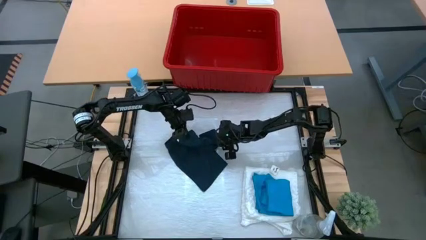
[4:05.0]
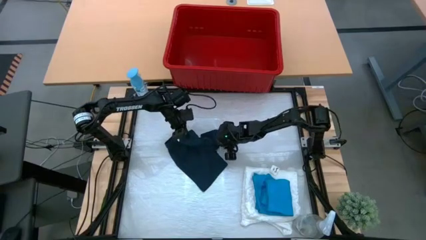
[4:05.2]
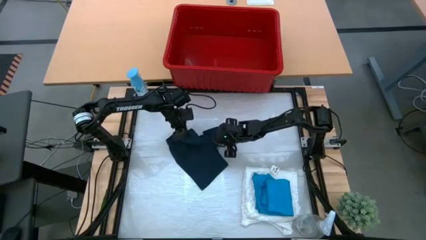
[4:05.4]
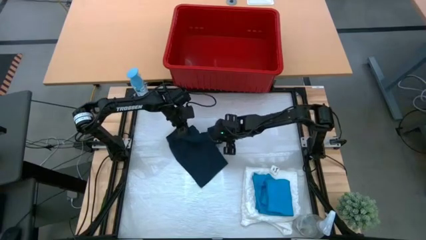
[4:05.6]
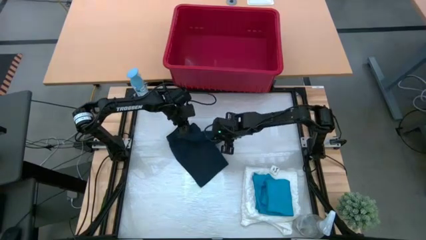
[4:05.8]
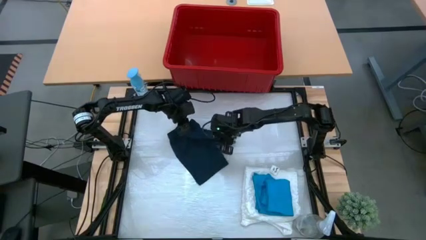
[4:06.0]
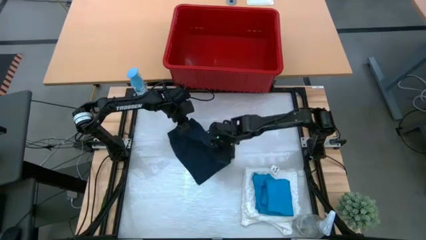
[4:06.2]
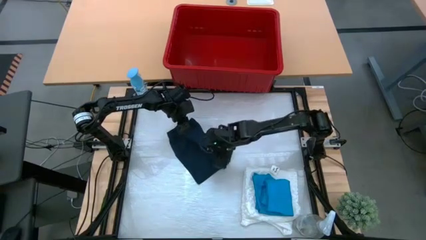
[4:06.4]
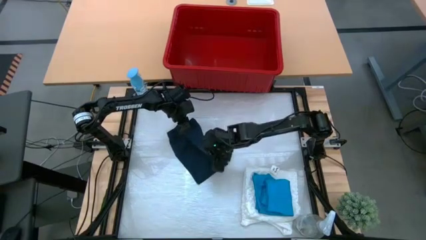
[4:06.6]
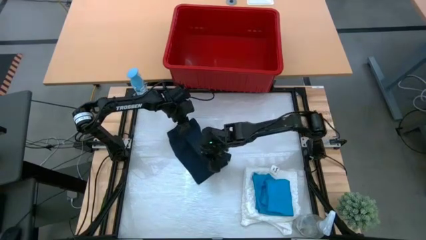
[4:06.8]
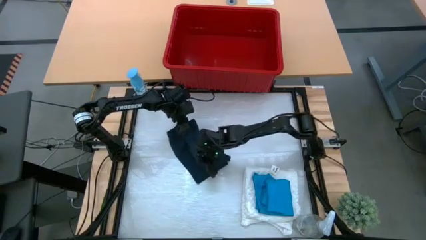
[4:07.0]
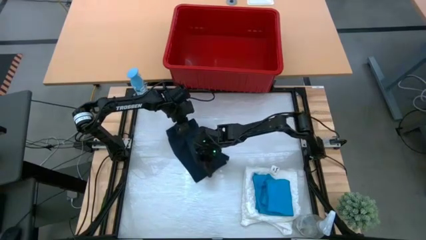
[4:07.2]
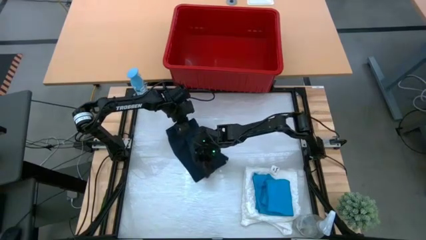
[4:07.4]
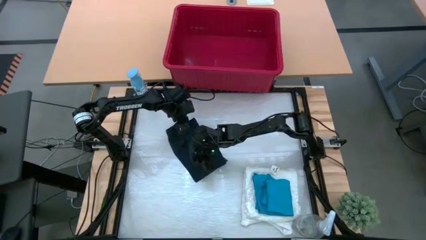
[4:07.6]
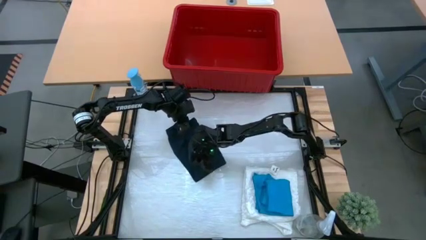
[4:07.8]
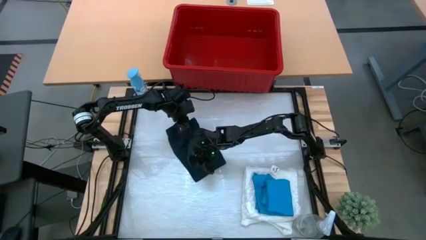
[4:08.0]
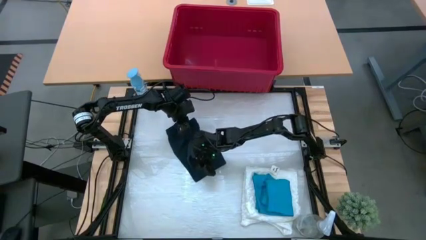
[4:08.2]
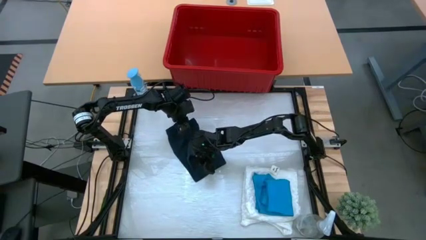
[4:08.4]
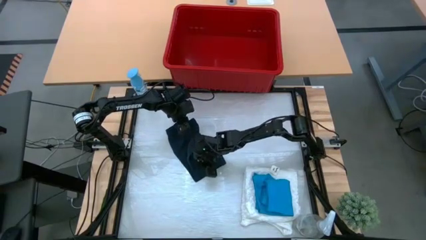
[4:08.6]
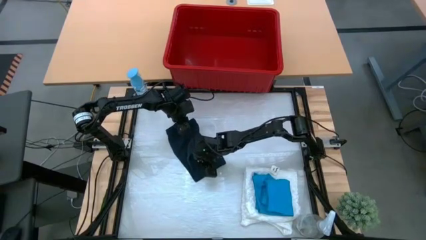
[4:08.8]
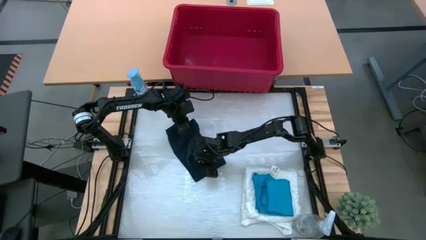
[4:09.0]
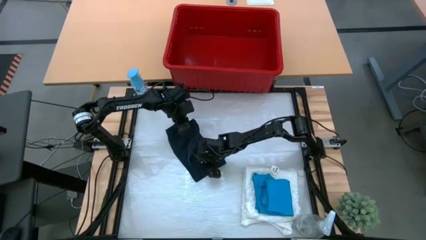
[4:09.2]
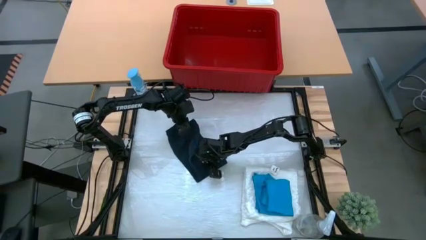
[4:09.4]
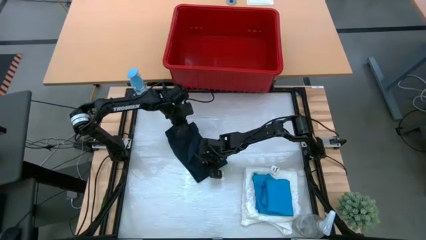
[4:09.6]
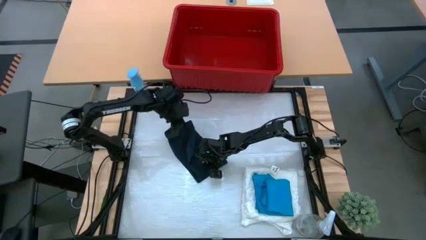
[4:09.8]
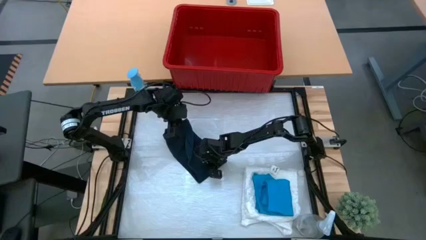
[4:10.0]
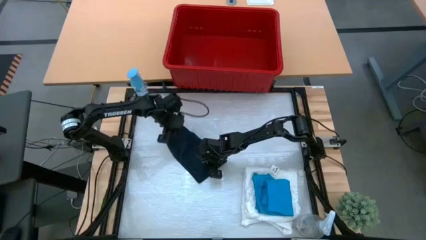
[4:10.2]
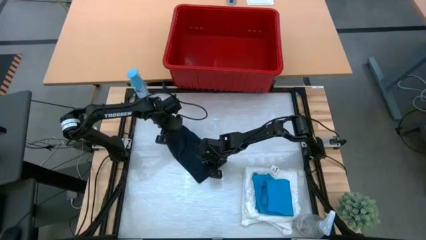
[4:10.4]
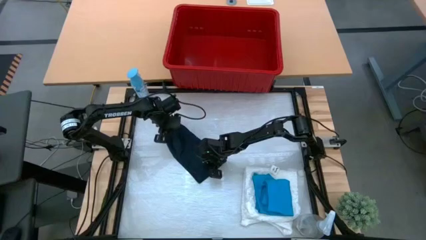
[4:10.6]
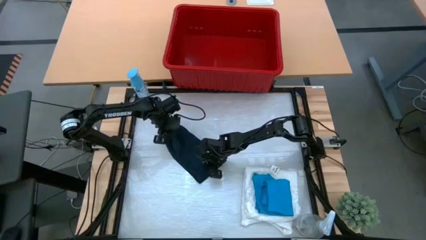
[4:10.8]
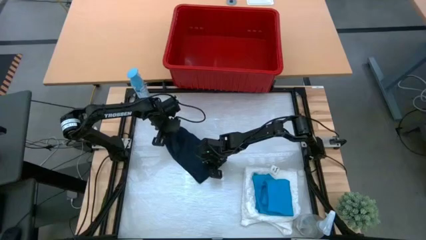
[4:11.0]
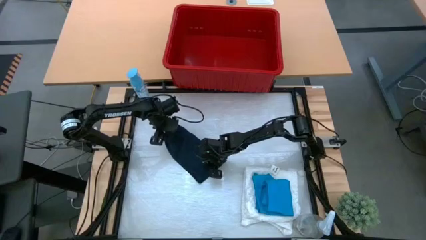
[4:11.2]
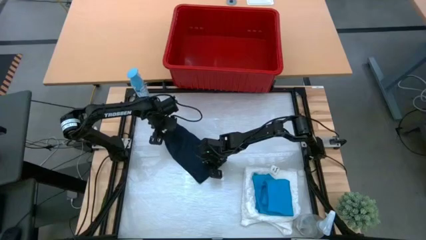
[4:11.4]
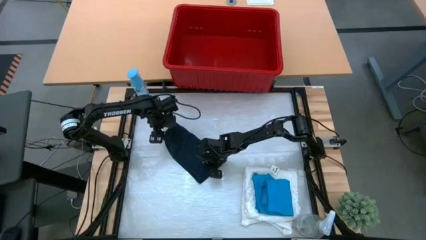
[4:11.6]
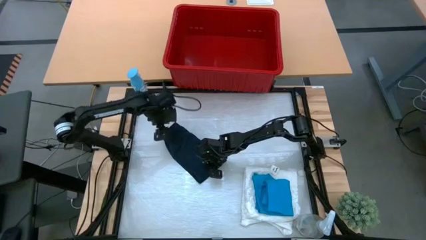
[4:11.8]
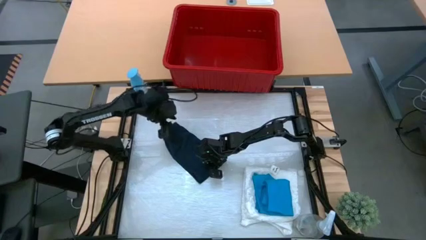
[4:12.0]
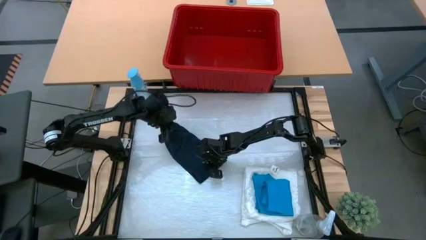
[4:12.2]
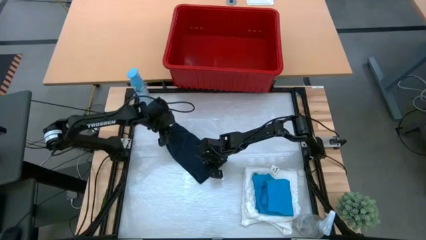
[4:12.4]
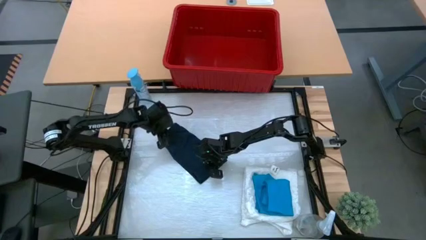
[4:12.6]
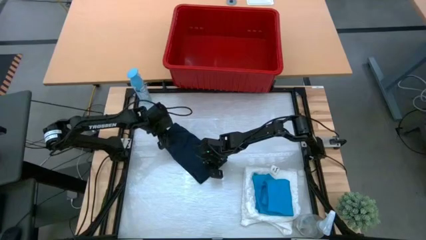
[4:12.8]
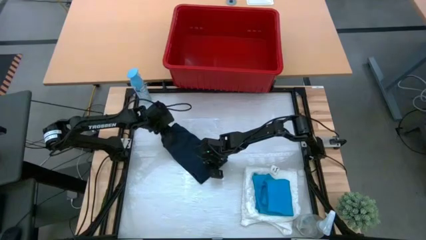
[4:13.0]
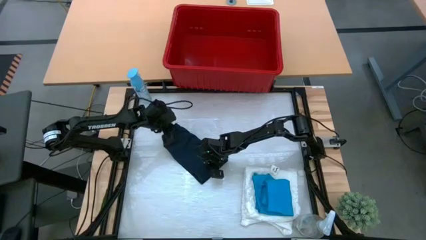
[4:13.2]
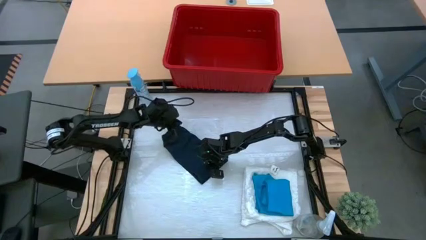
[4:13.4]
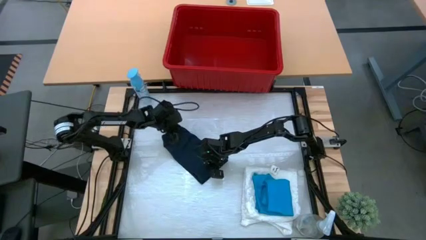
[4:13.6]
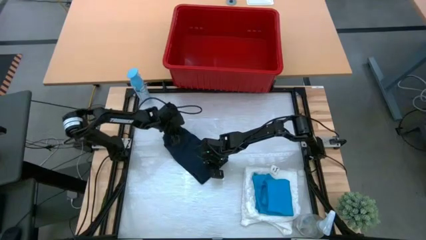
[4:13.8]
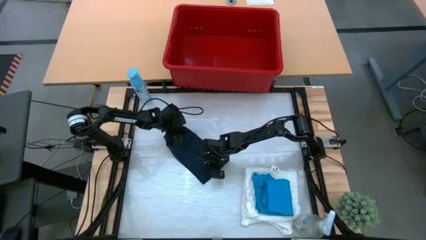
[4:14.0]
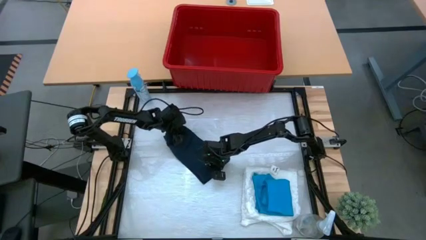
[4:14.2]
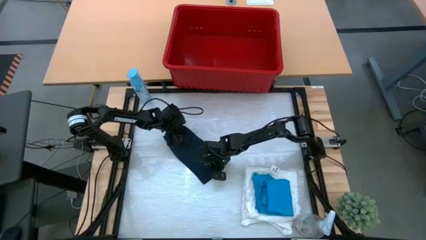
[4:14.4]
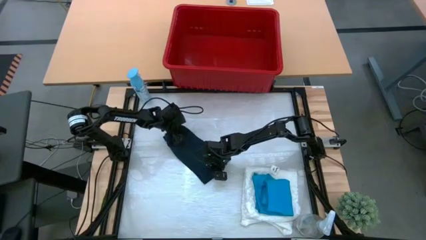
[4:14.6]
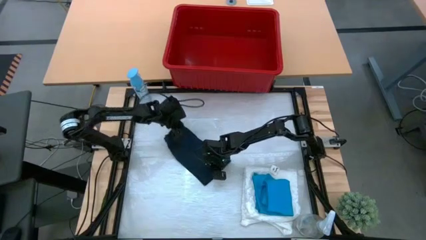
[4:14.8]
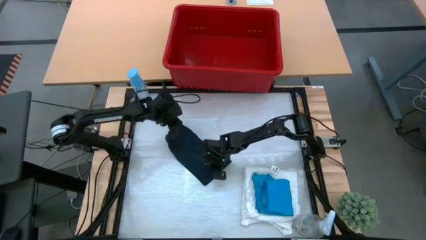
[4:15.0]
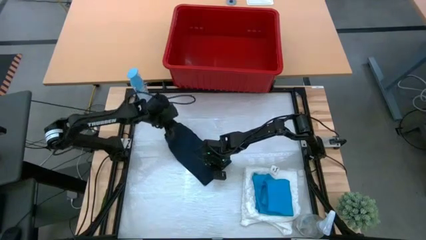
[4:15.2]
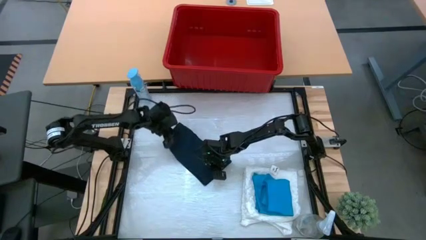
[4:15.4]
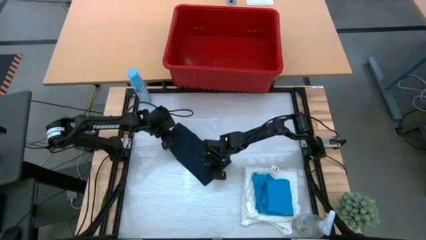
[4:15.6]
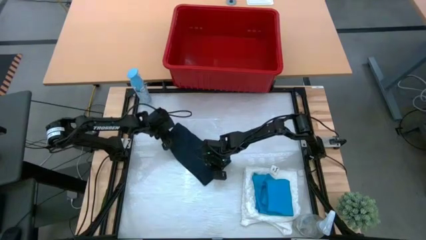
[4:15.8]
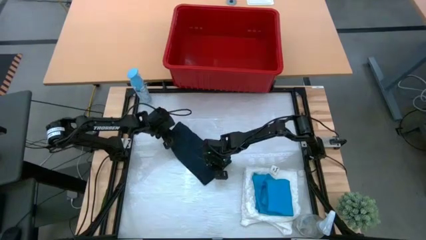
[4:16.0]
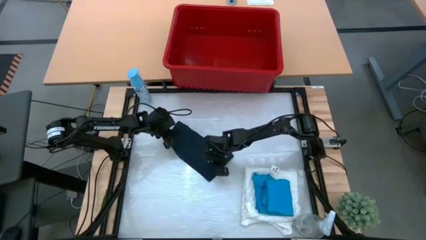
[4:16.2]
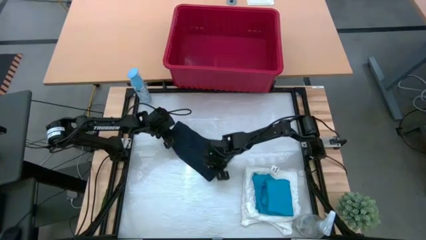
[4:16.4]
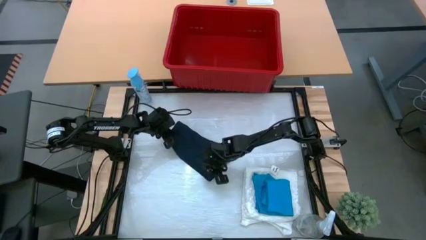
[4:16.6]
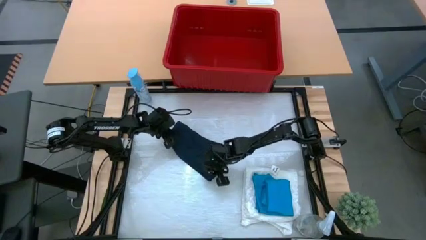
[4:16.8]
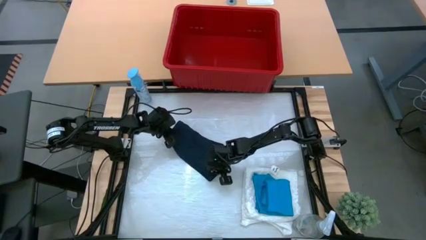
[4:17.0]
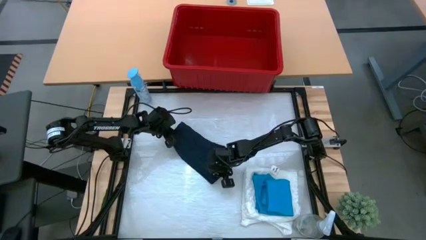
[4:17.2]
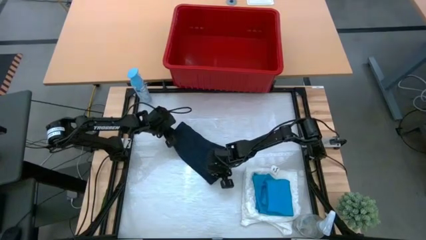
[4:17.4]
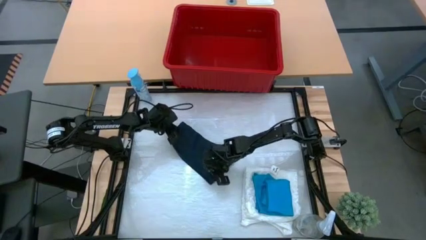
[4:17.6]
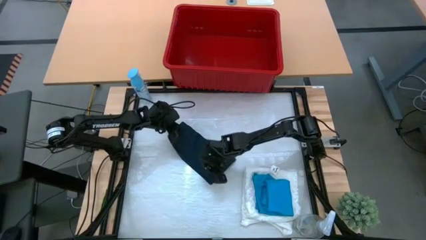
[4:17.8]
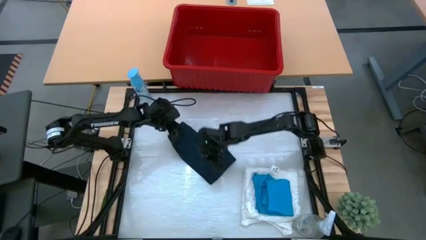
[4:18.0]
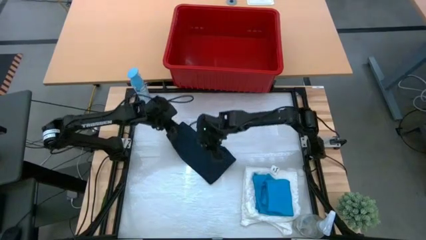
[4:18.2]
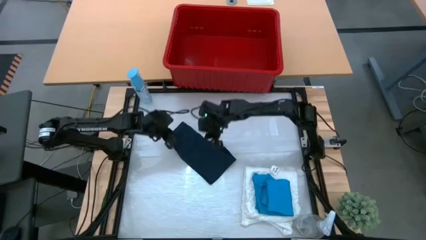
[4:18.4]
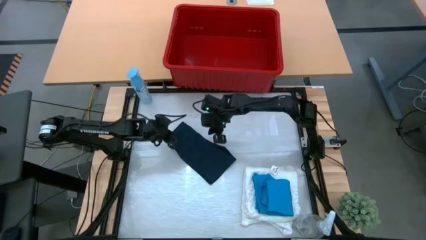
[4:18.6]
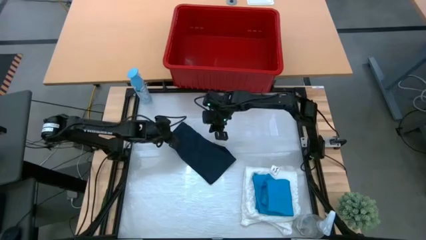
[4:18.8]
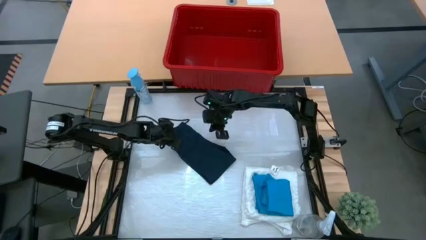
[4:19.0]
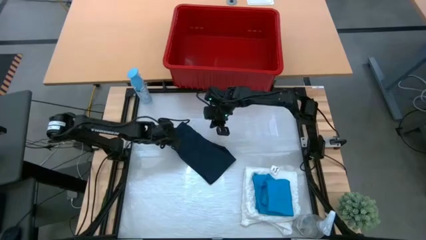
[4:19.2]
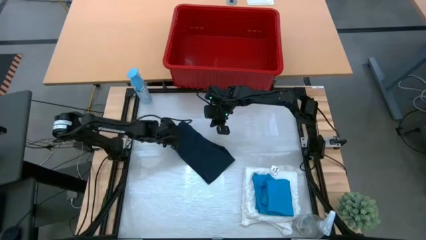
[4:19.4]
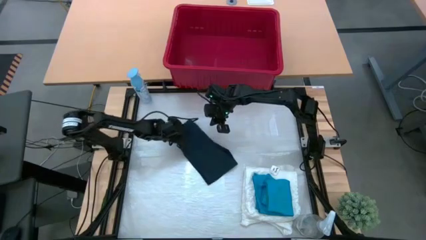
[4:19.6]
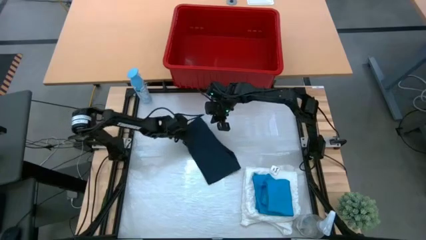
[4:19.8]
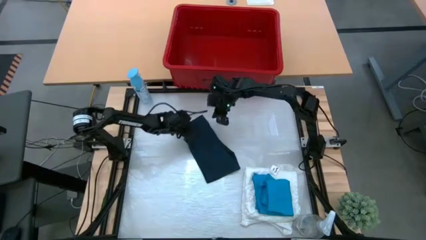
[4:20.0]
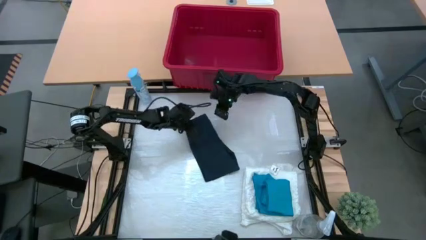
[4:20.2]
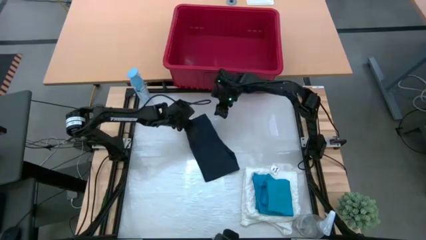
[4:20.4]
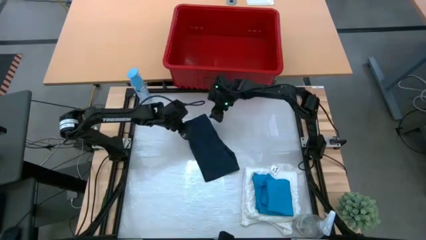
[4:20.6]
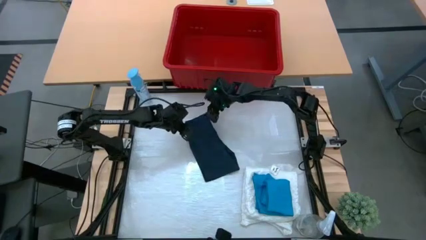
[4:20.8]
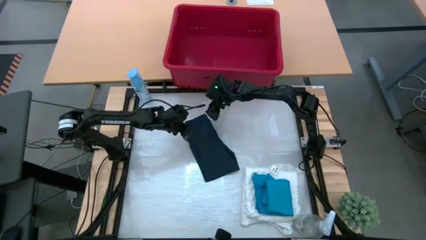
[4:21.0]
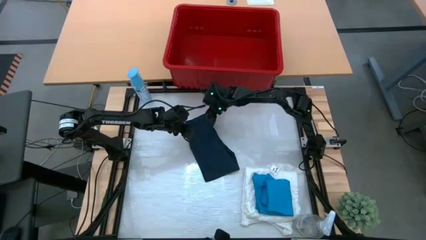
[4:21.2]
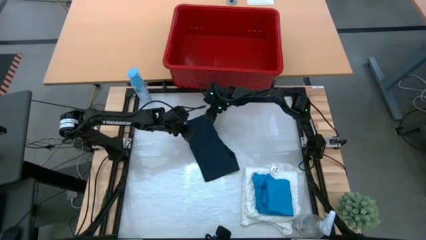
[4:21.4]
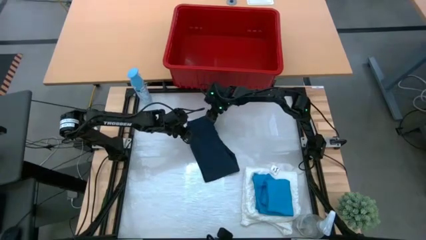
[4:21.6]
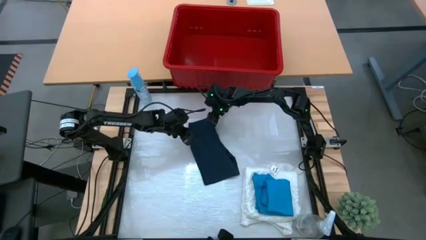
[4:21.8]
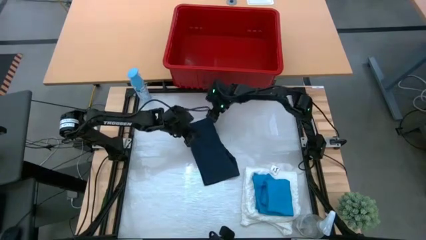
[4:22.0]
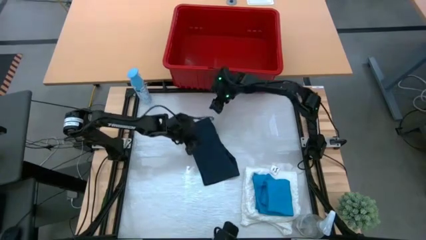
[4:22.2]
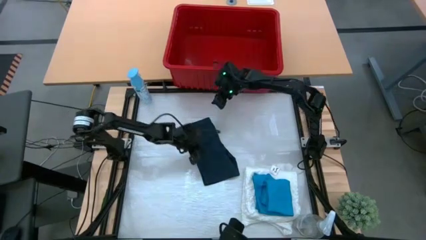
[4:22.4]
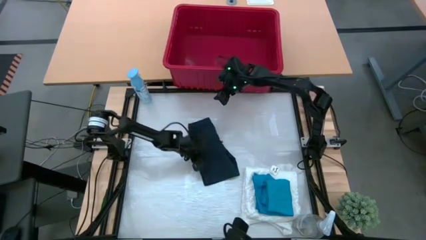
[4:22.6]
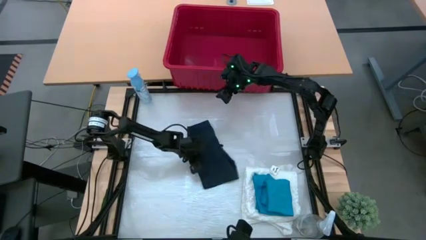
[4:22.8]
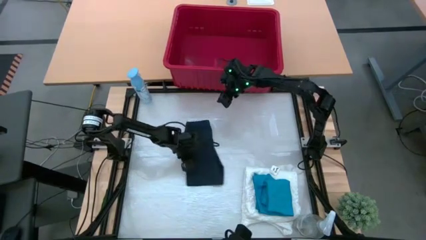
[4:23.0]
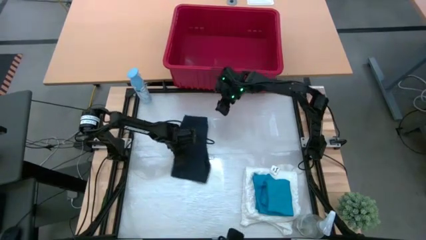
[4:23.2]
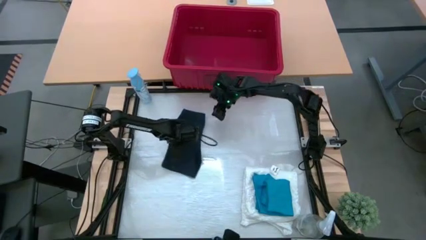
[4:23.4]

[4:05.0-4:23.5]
Task: Fold laundry
Fold the dark blue shorts
